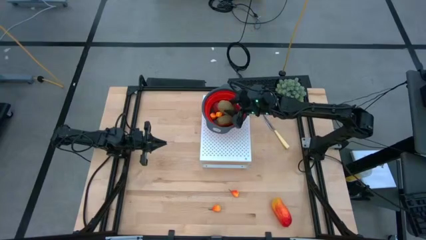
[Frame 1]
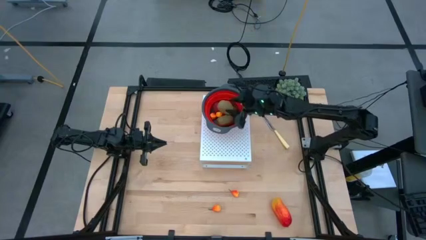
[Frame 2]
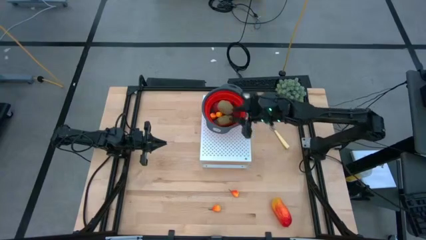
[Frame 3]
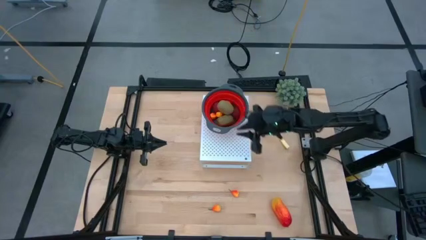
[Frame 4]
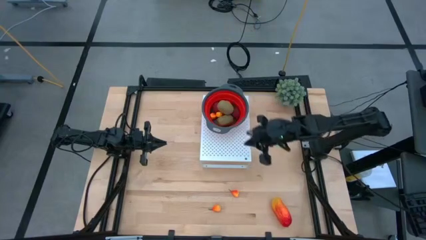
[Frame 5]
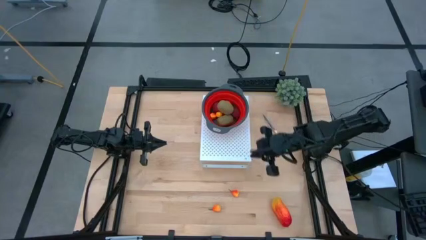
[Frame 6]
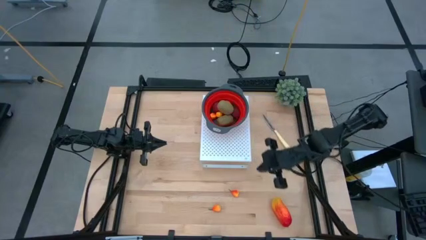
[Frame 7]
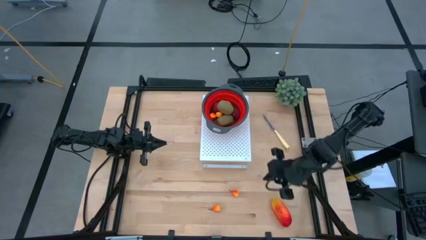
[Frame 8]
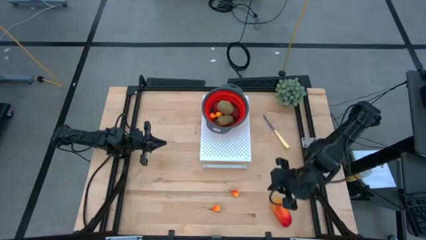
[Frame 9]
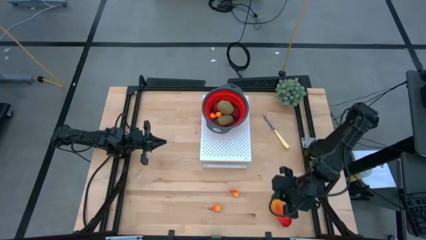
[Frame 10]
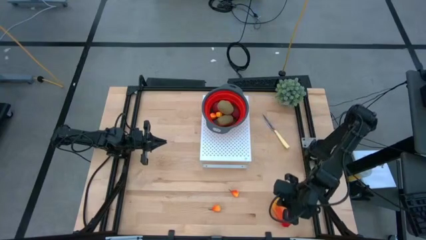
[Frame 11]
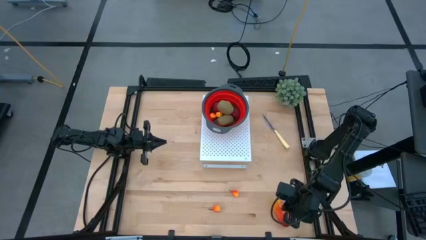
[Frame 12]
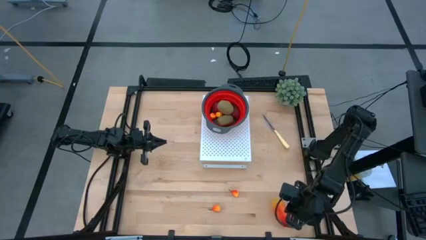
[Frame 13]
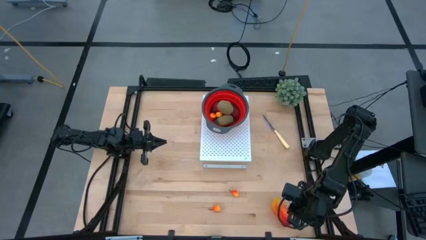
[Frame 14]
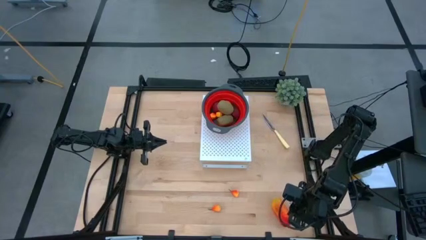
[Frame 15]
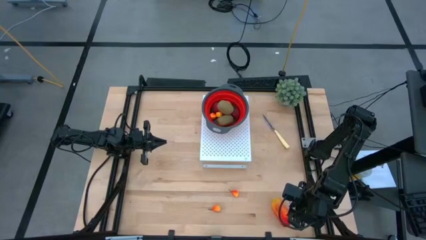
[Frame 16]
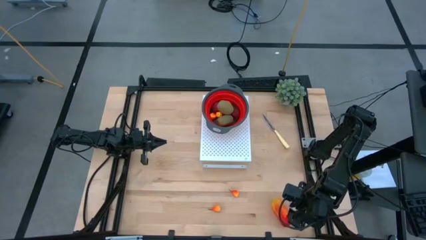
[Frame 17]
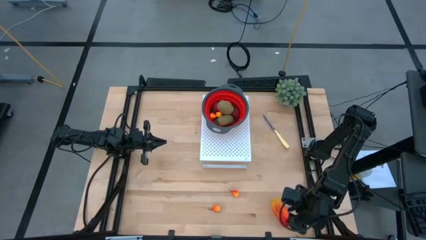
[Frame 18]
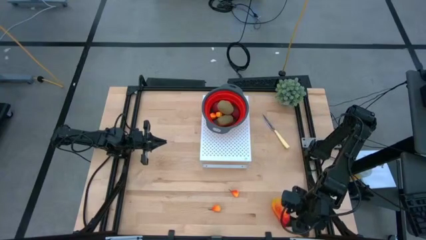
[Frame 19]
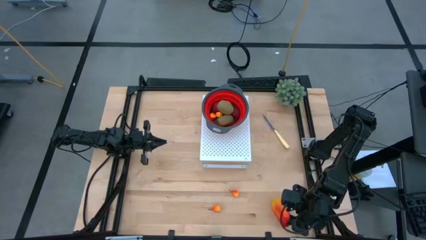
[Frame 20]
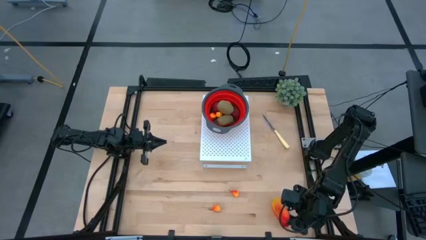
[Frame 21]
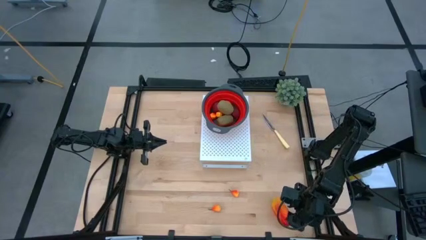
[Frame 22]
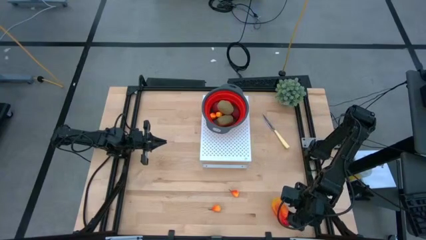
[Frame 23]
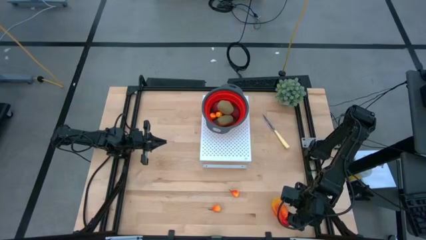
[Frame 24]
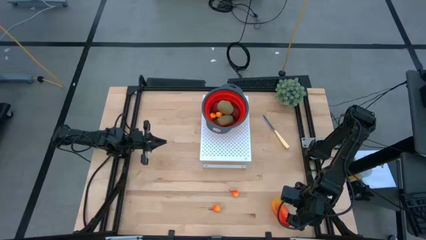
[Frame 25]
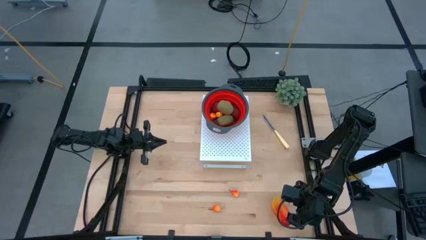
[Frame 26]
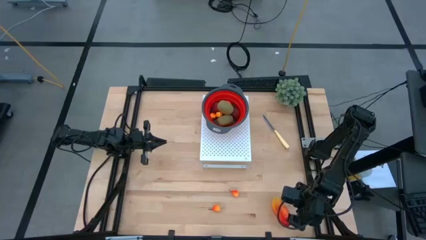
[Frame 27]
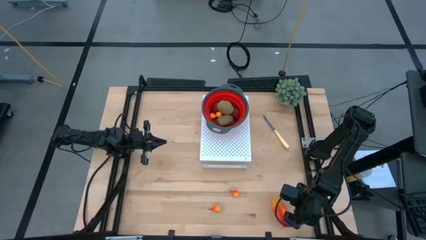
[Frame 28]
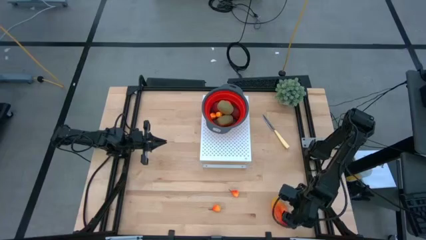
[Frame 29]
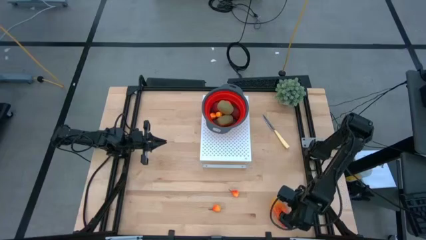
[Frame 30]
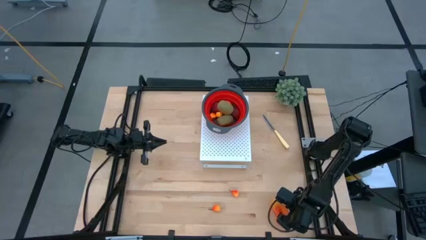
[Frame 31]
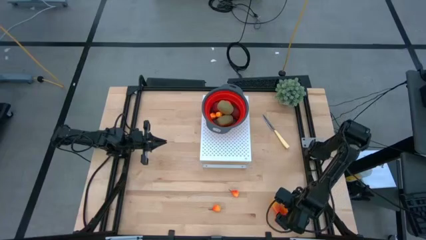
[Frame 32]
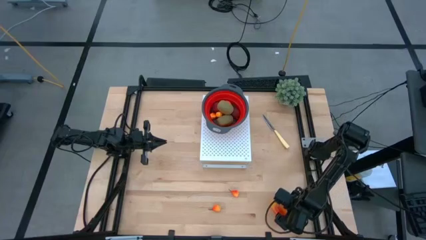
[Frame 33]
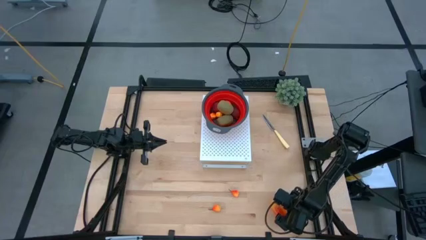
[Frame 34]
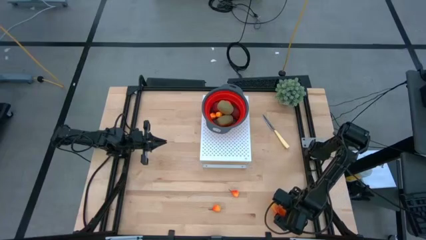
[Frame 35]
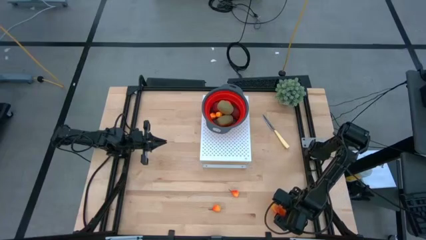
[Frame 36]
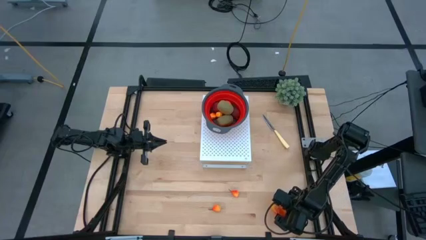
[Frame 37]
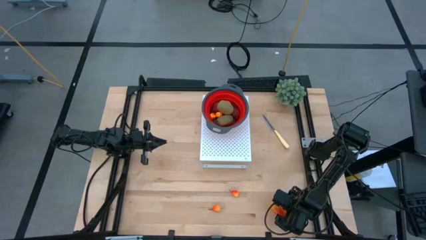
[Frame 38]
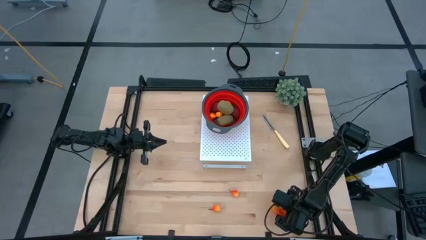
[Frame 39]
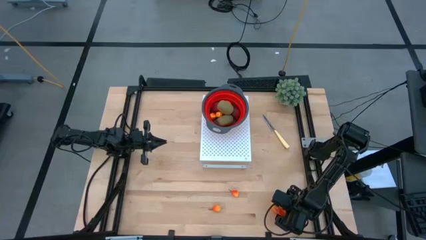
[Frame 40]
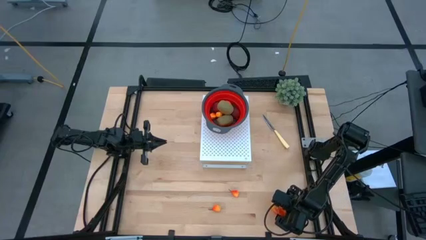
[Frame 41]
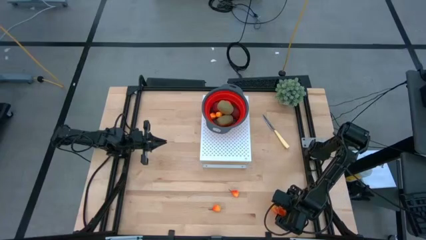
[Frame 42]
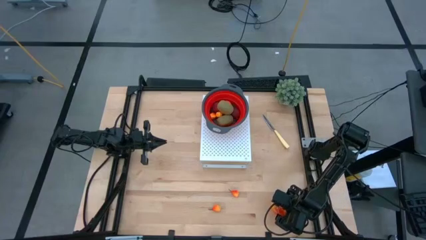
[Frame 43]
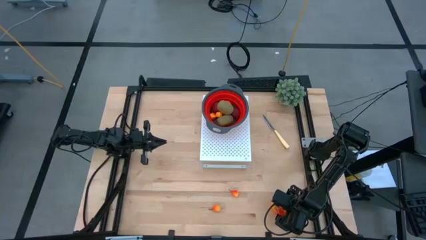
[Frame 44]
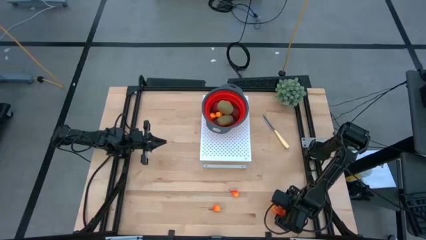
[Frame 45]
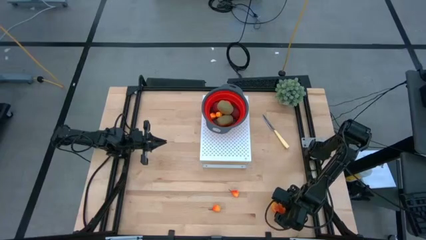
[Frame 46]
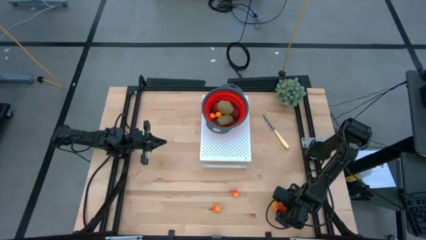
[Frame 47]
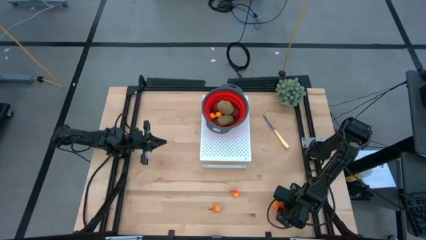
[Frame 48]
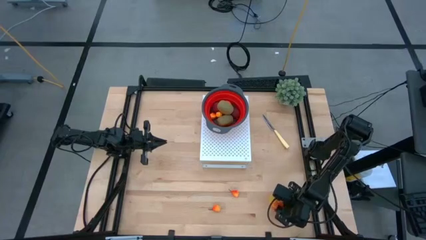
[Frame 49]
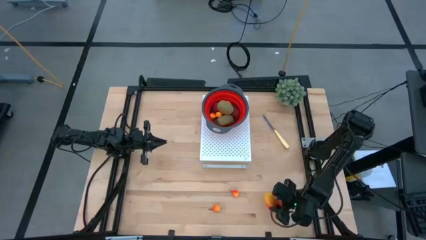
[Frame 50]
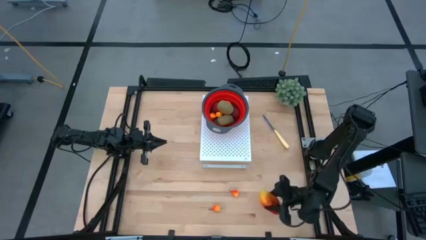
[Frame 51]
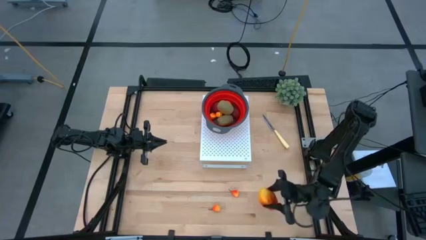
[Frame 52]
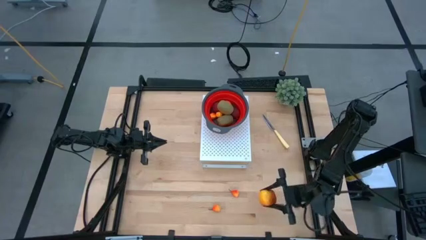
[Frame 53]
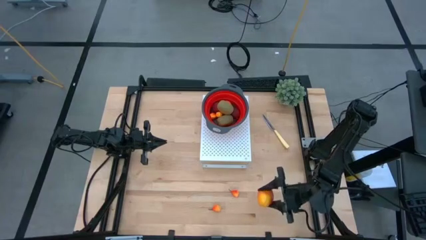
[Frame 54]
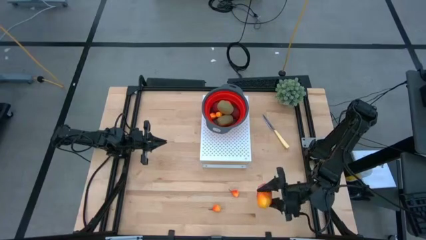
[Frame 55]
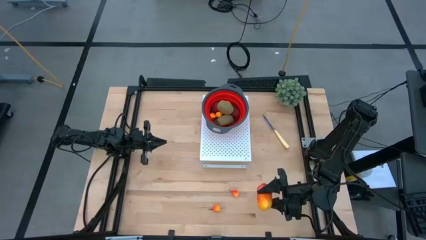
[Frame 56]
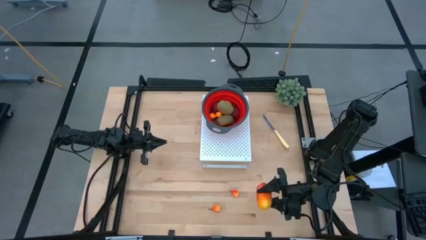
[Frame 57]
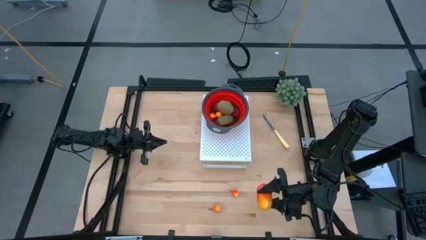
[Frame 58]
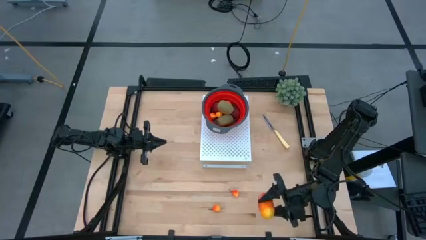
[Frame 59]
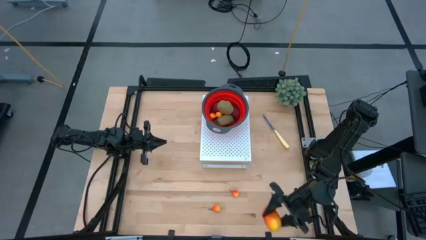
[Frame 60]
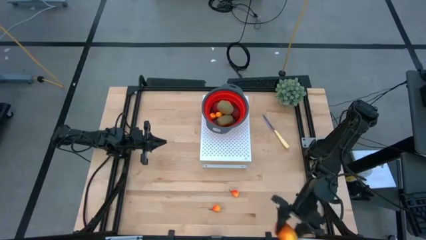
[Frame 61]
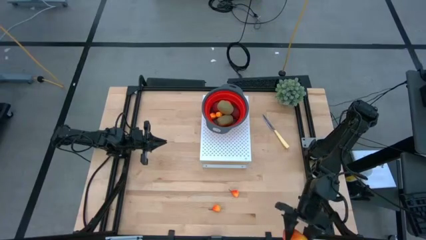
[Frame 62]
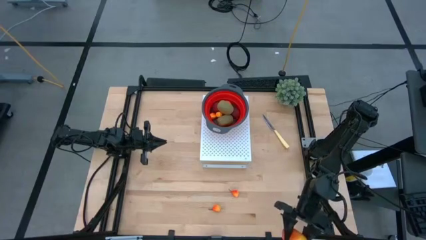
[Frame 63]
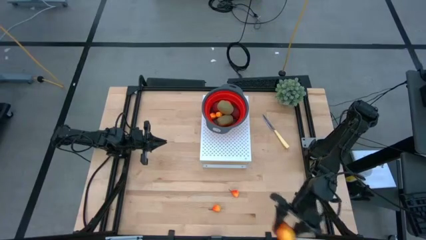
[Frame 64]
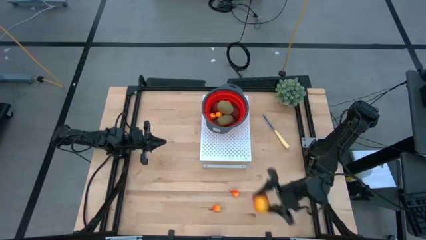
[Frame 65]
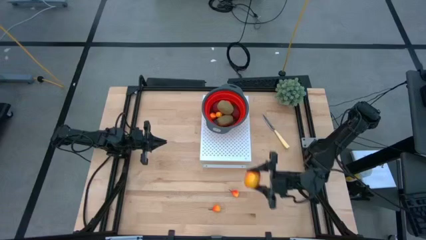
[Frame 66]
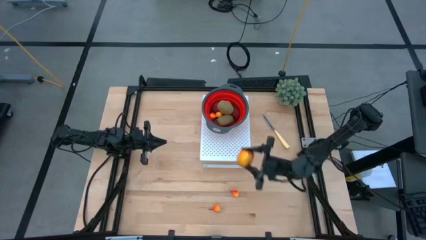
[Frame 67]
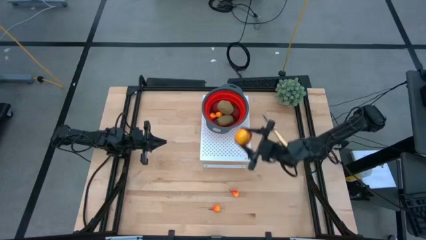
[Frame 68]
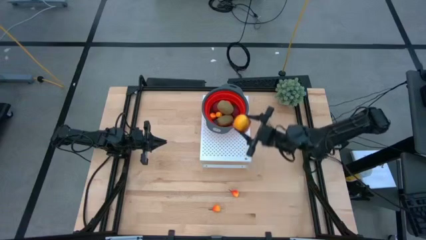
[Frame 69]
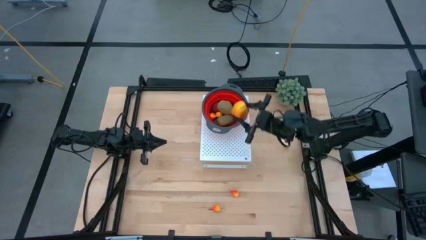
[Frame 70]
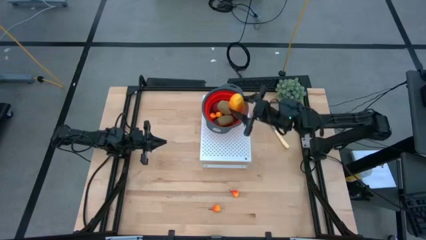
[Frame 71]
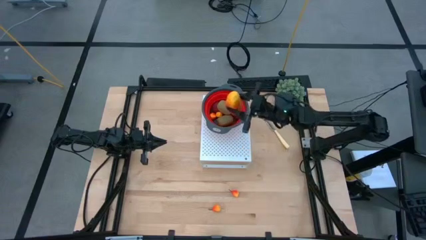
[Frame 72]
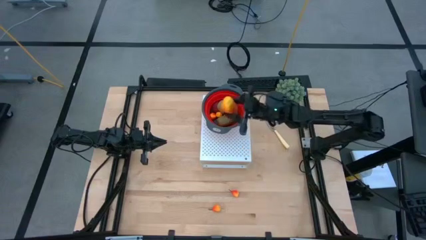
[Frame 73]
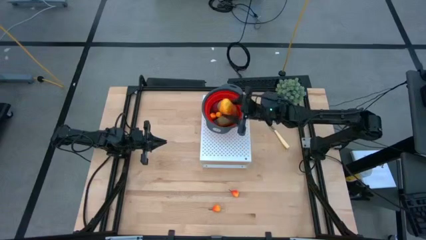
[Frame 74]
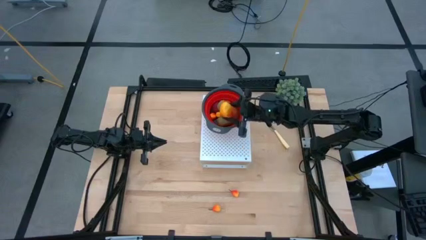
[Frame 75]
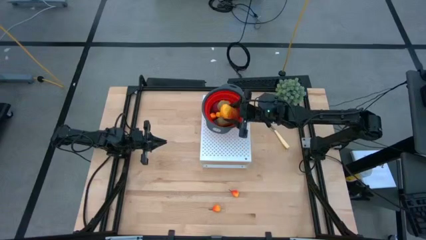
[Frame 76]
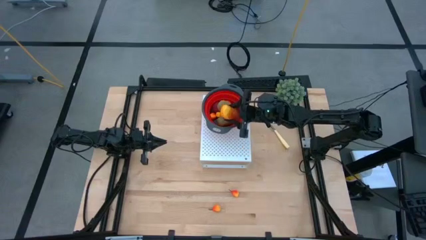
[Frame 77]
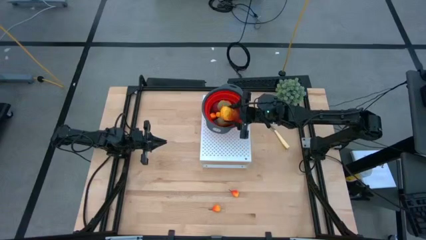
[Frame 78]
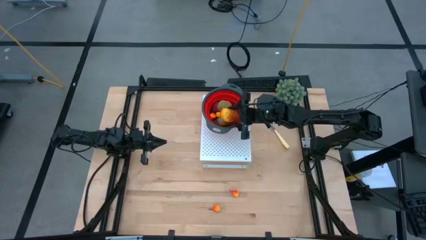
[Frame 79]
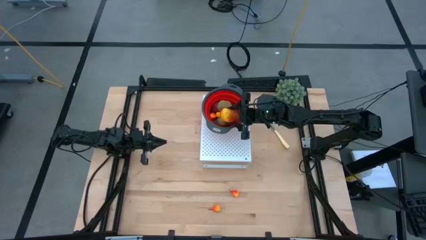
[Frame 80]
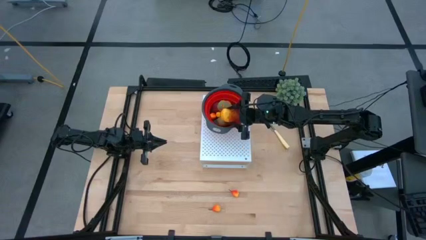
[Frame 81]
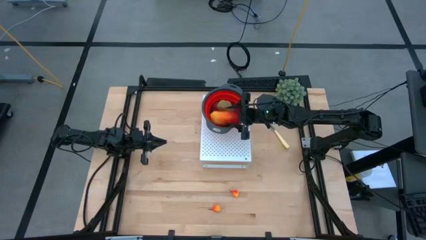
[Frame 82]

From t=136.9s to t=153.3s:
Task: Pick & Place Fruit
Put the orange mango into the red strainer bowl
